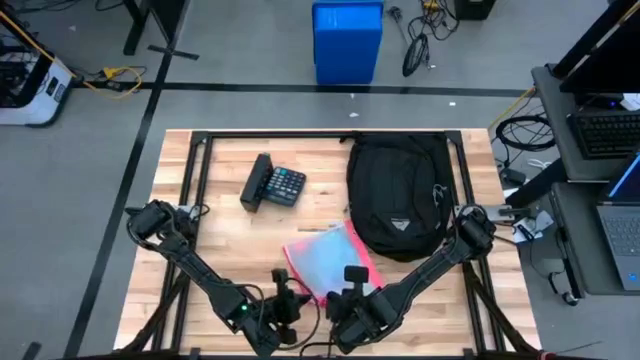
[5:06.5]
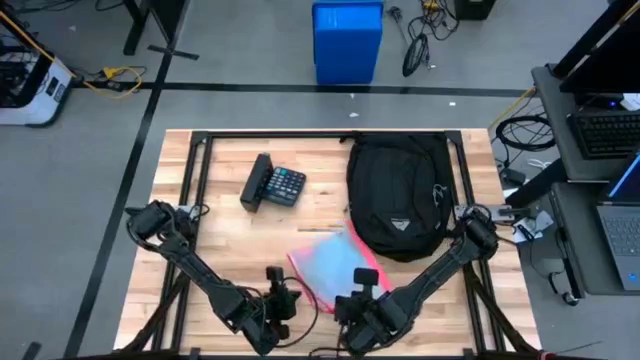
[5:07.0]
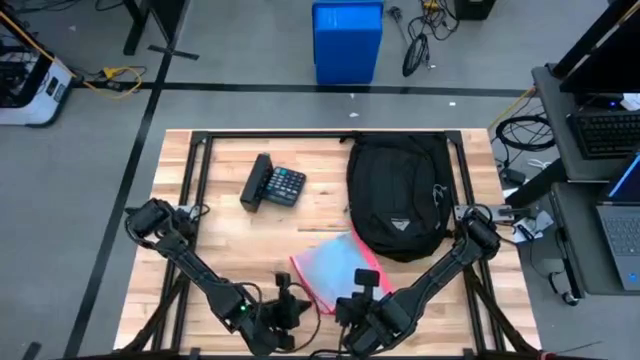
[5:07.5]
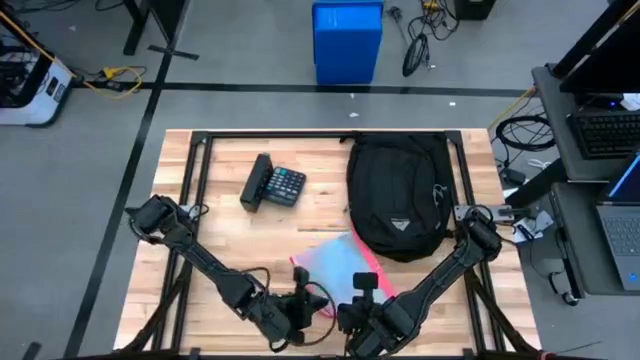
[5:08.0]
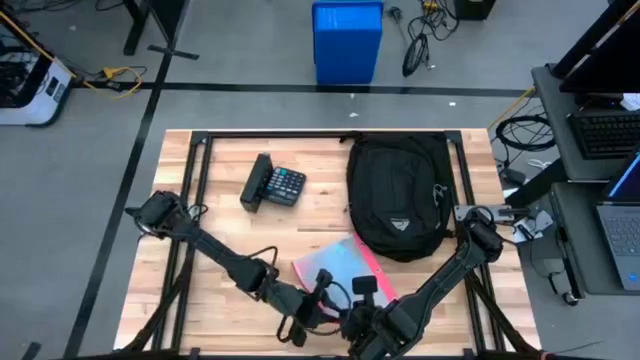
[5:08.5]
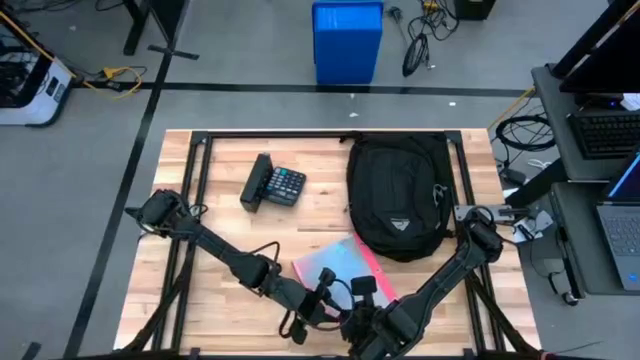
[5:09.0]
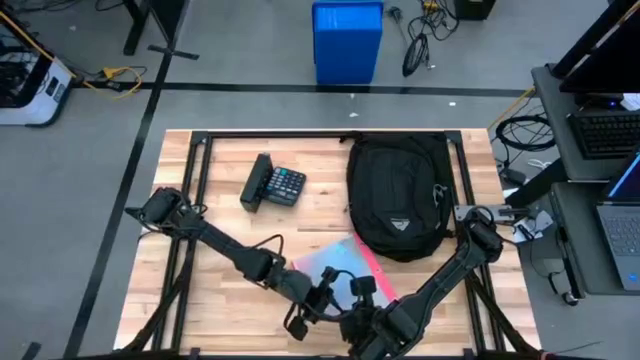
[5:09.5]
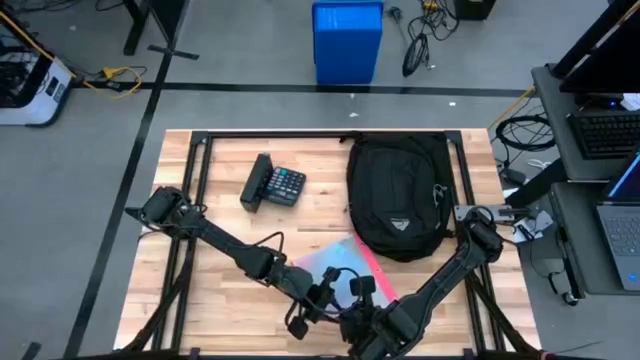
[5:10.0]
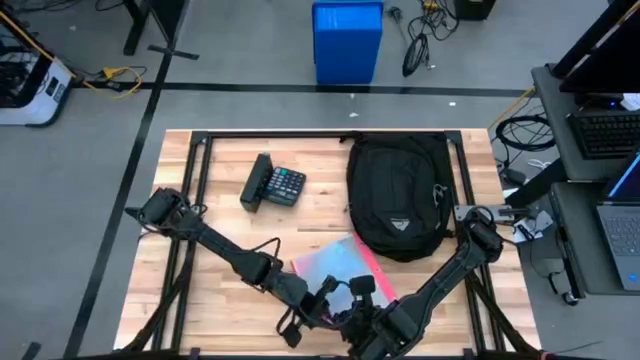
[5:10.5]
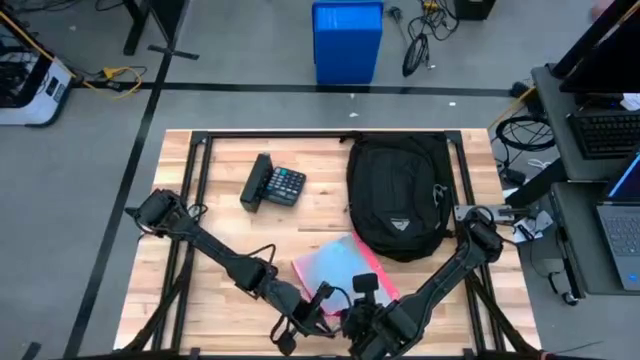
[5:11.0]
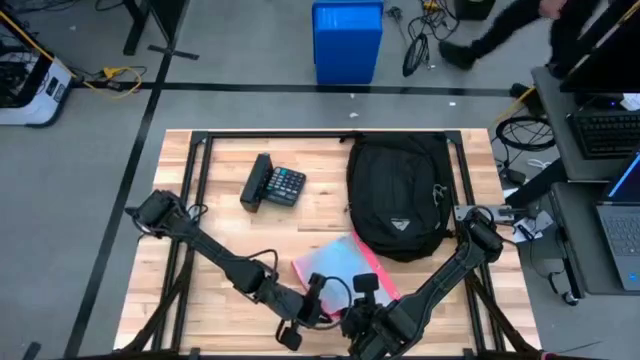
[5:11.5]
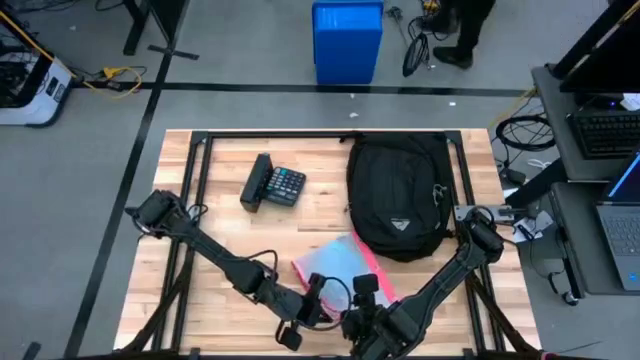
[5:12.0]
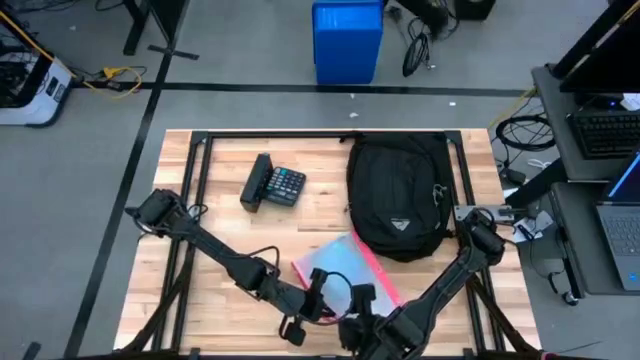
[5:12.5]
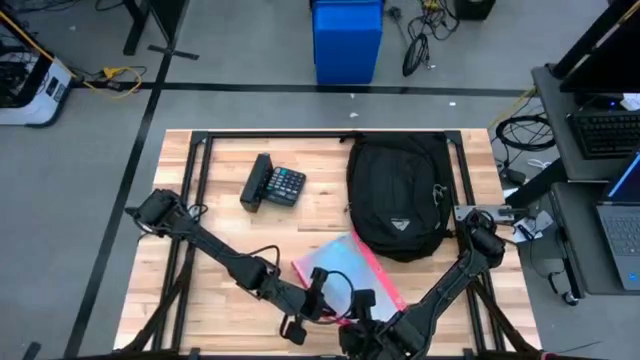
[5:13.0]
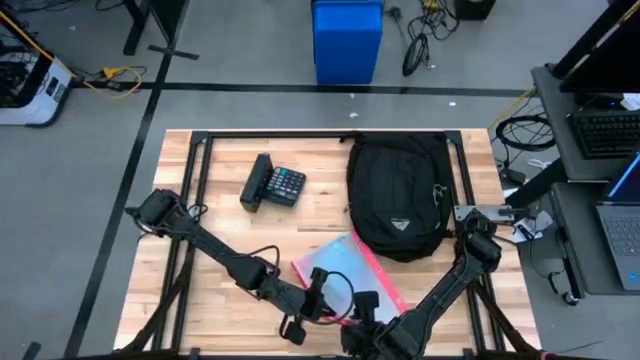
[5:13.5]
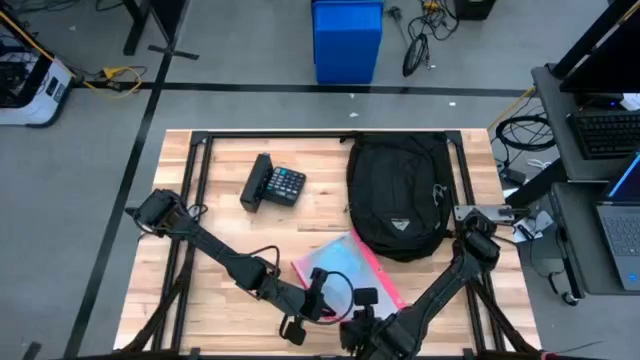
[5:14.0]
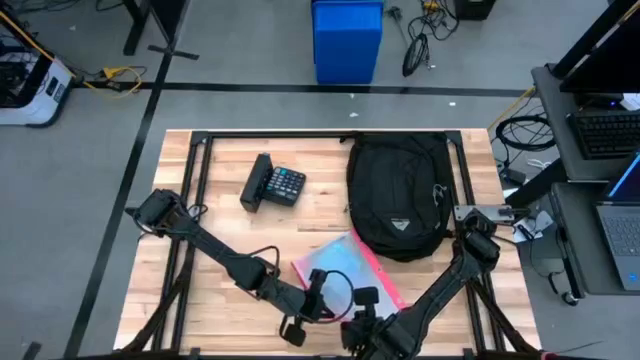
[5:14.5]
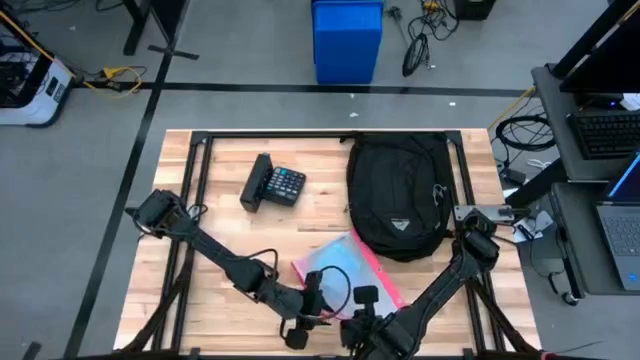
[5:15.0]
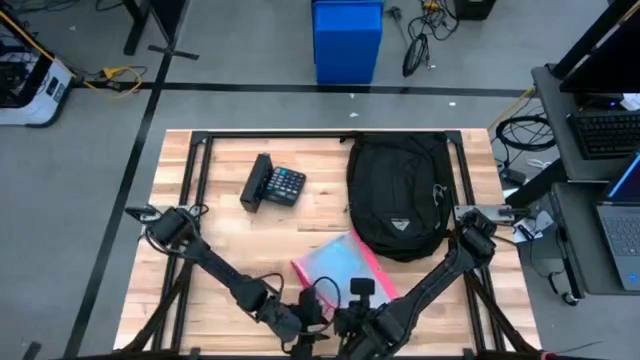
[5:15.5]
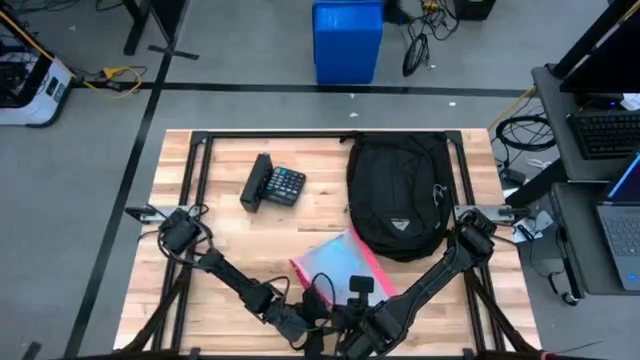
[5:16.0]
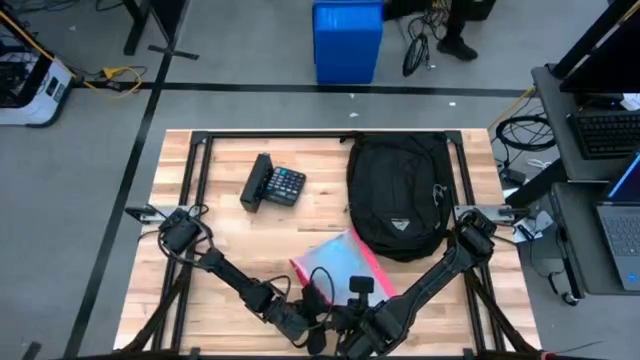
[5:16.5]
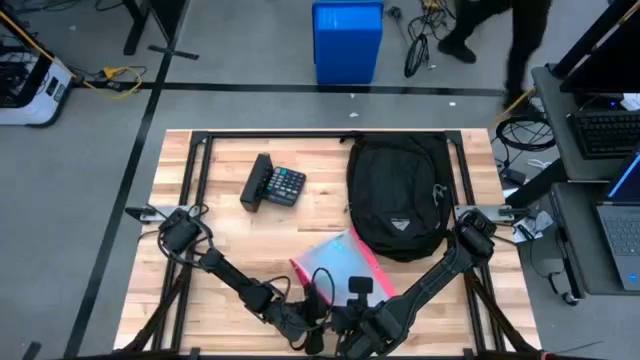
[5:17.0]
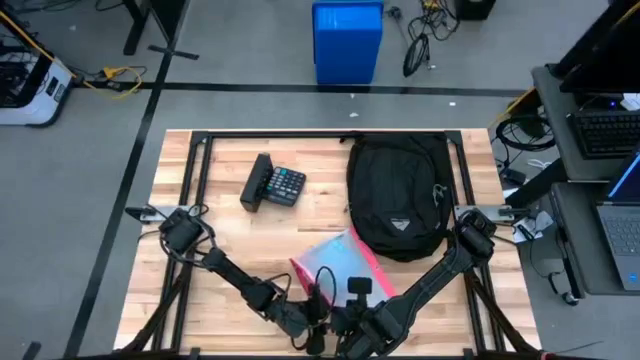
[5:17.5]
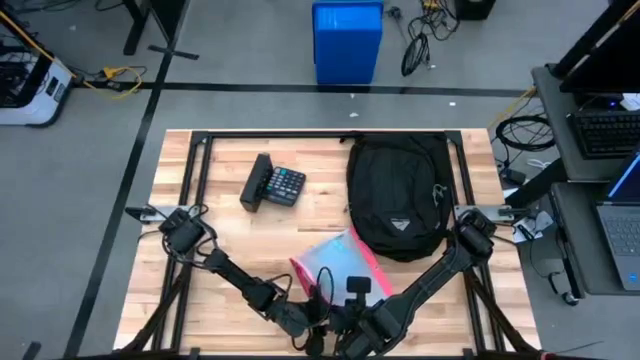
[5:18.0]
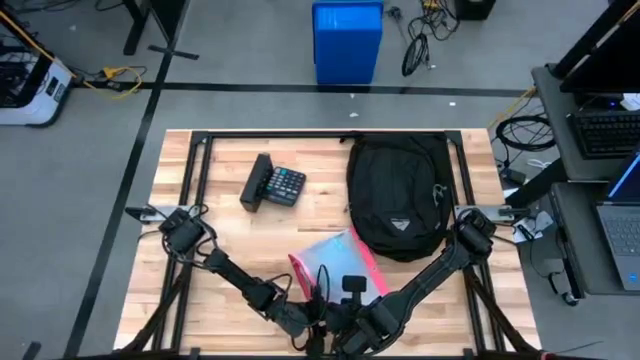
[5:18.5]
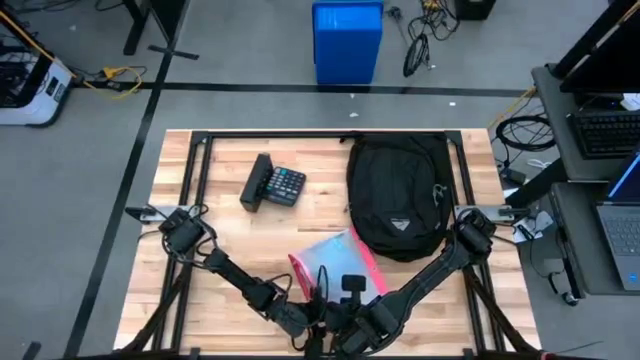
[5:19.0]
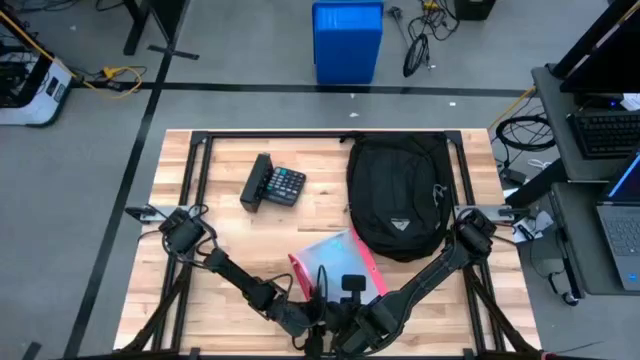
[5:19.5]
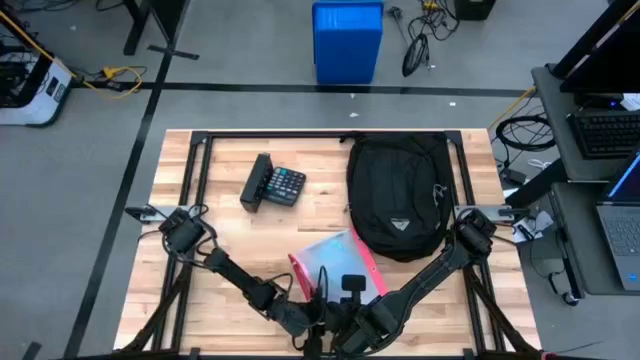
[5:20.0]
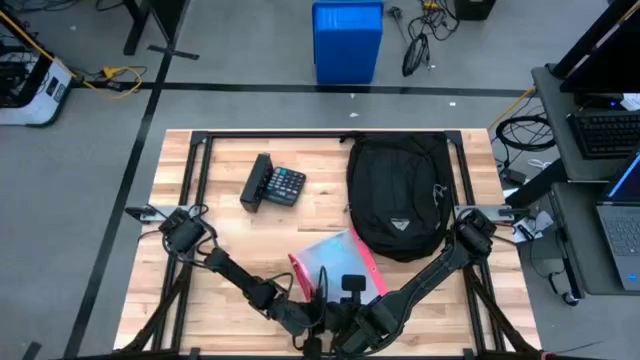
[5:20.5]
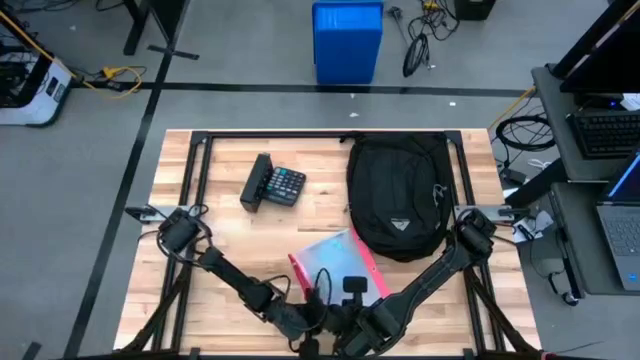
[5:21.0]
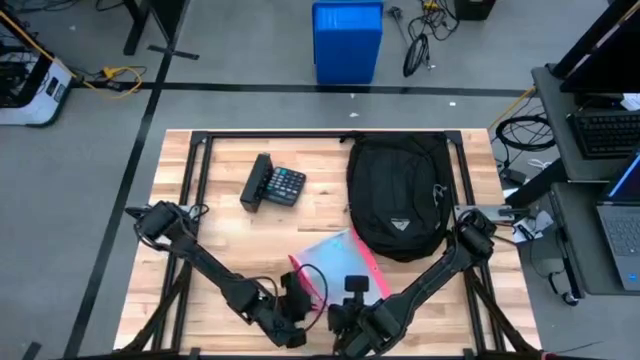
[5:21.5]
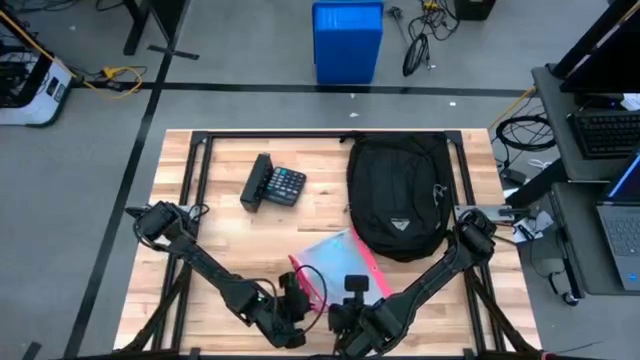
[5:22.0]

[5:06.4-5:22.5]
Task: Unpack backpack
Close the white zip bag

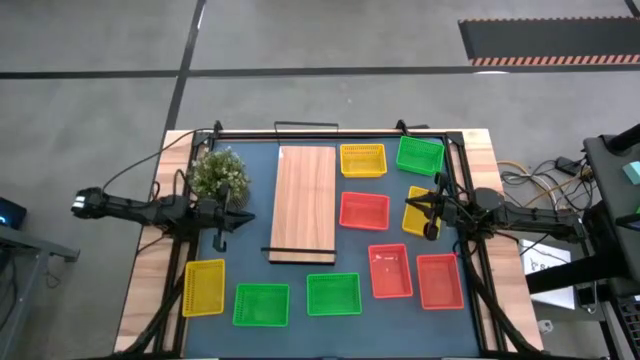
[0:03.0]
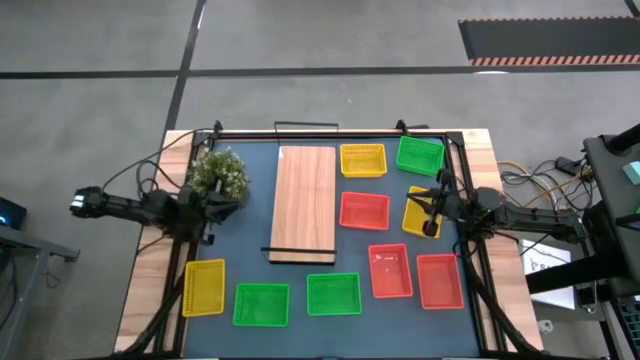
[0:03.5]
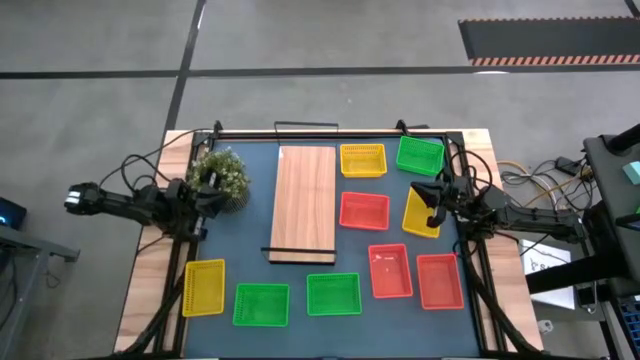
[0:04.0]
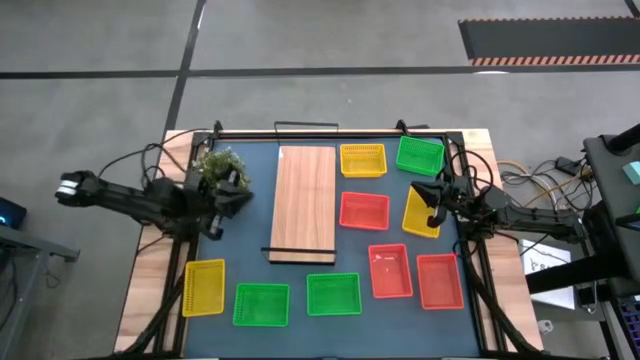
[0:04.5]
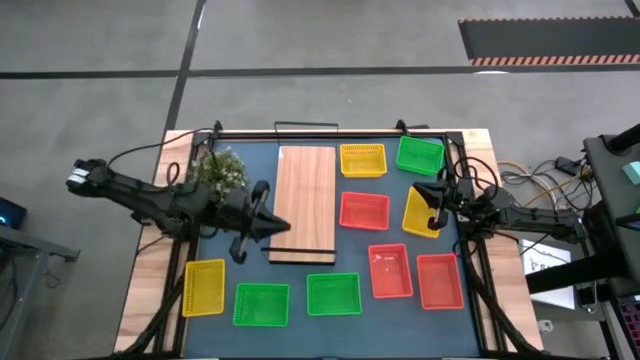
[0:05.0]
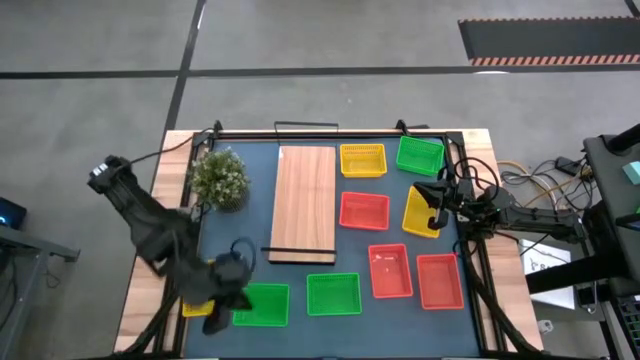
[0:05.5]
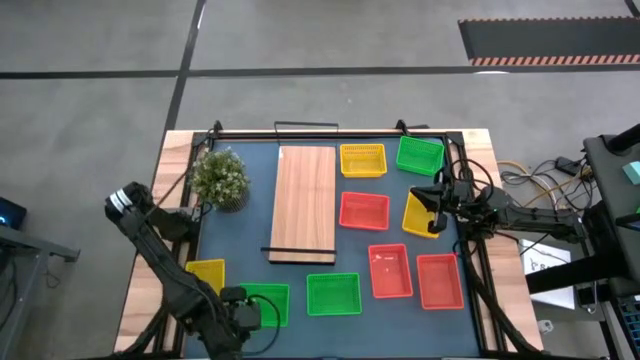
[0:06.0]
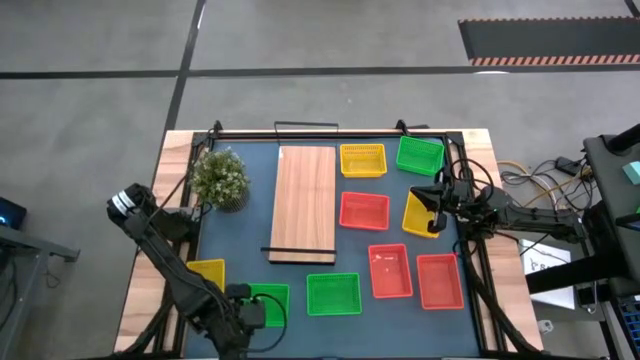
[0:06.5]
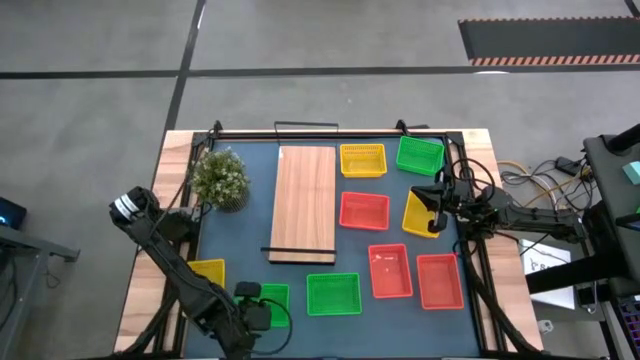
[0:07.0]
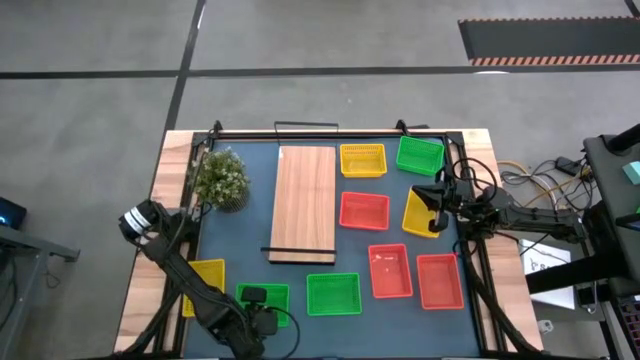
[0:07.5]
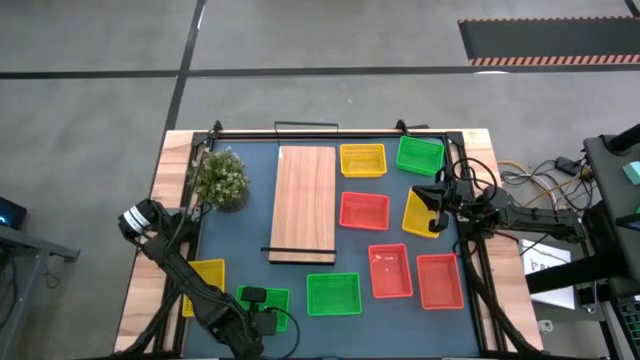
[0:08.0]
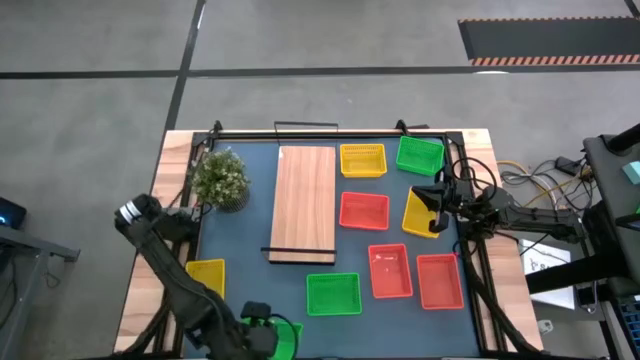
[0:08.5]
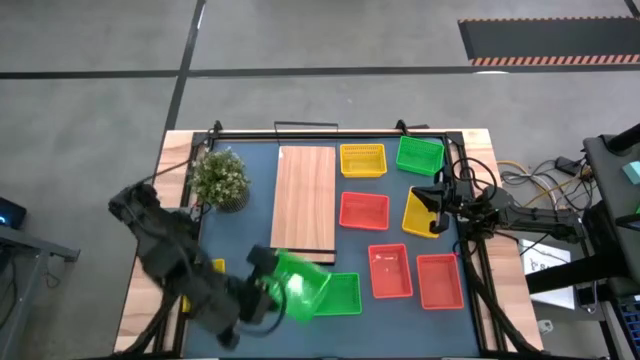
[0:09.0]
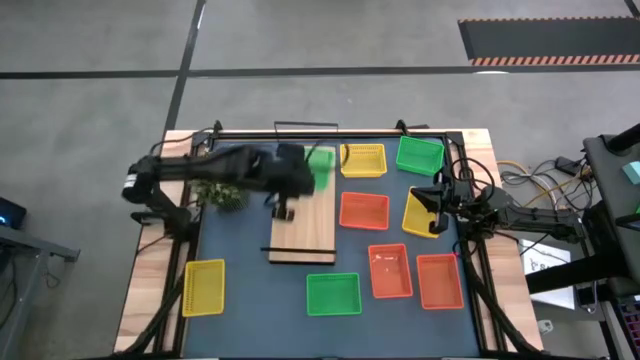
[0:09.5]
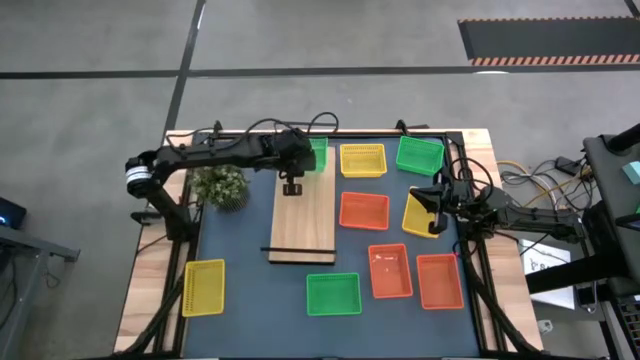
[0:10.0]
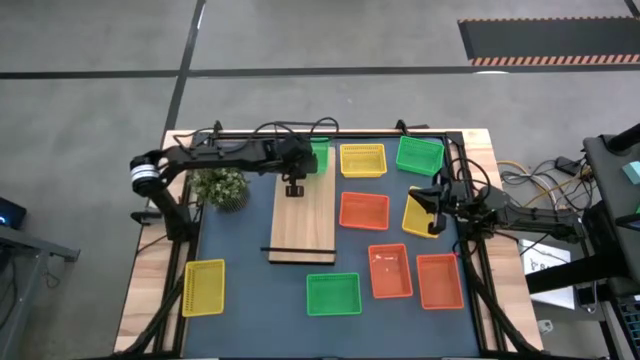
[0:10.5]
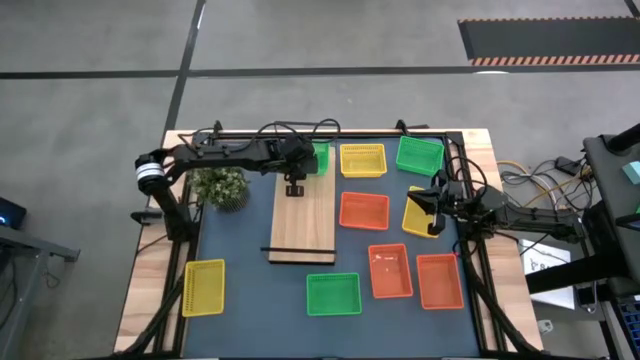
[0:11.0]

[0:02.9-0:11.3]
Task: Stack baskets on shelf by color
Put the bottom left green bin on the shelf
